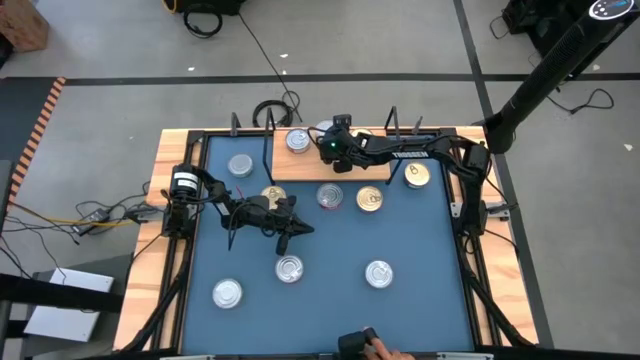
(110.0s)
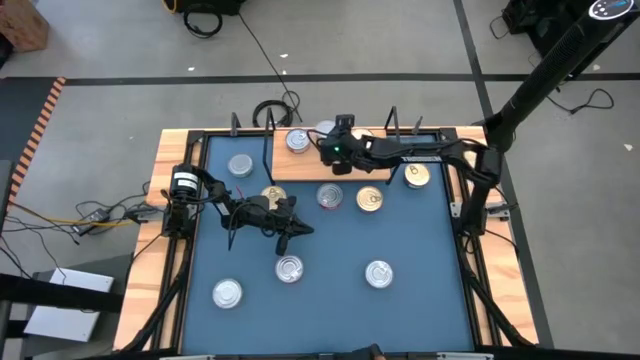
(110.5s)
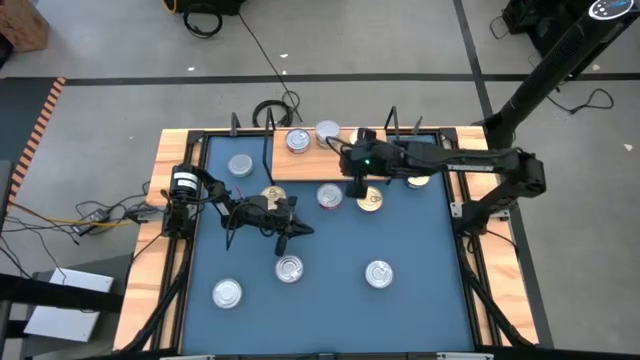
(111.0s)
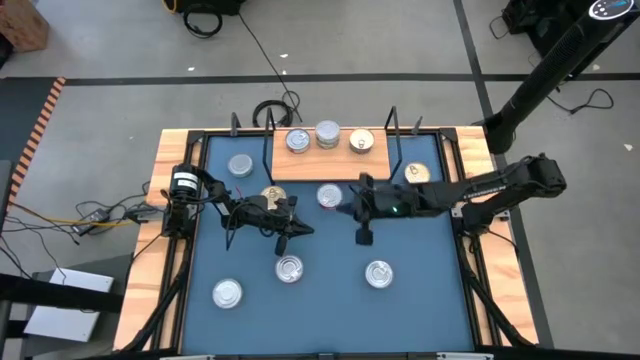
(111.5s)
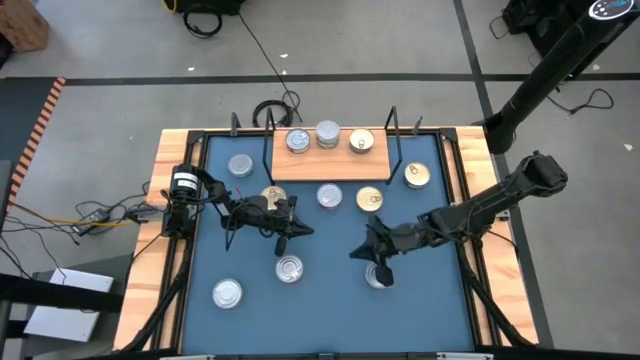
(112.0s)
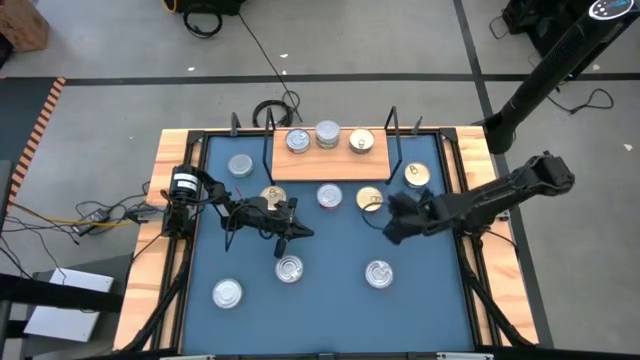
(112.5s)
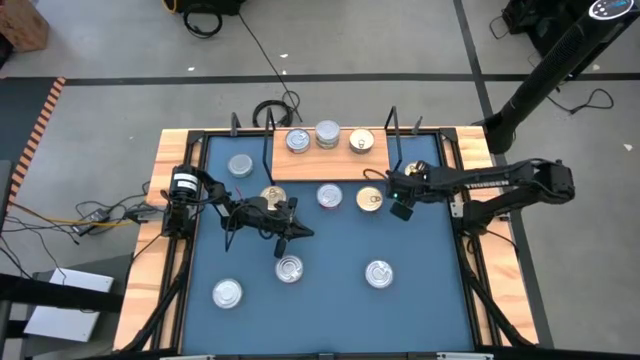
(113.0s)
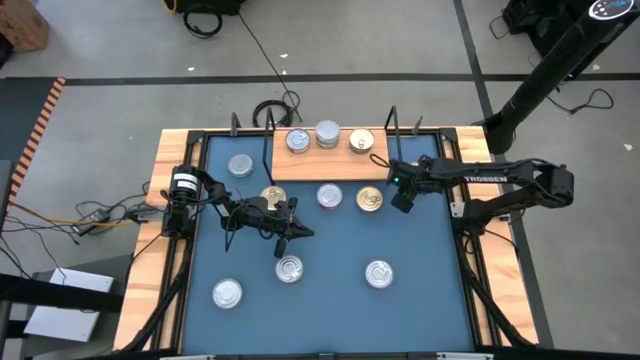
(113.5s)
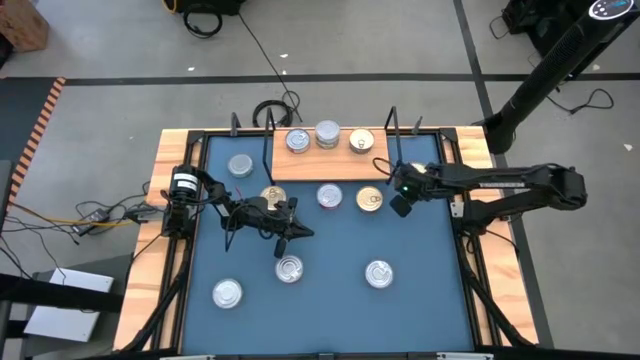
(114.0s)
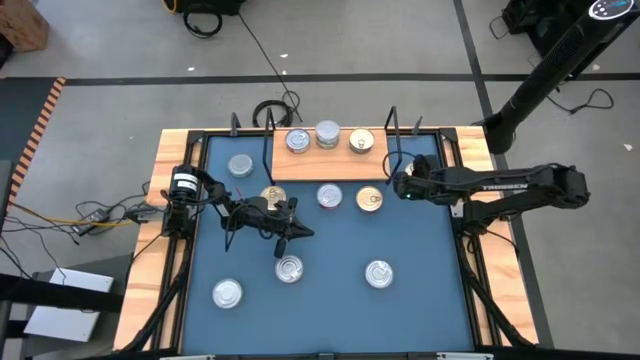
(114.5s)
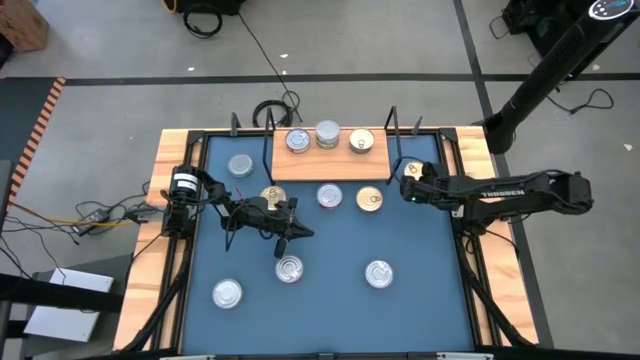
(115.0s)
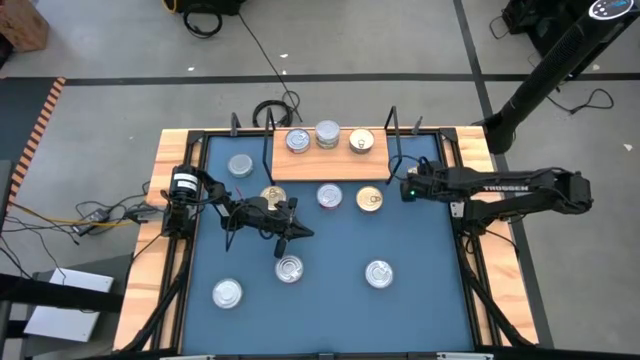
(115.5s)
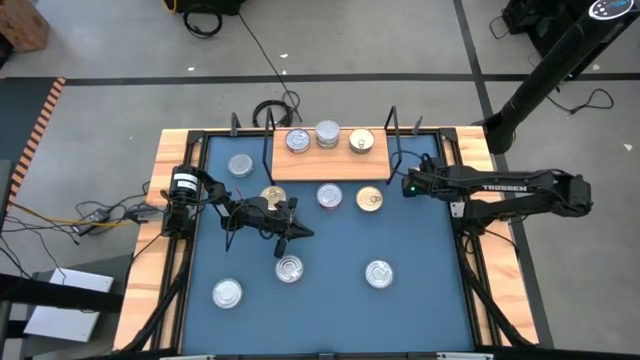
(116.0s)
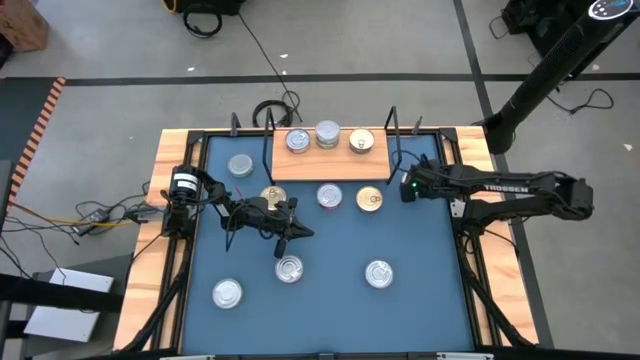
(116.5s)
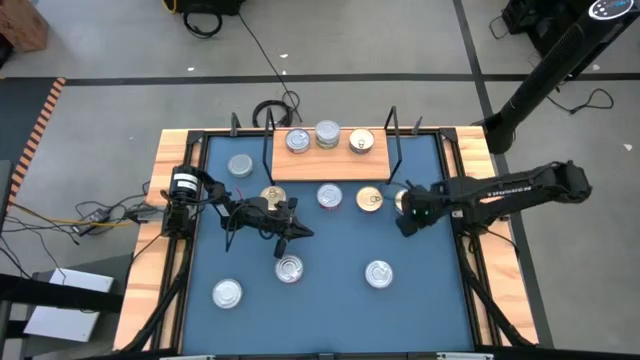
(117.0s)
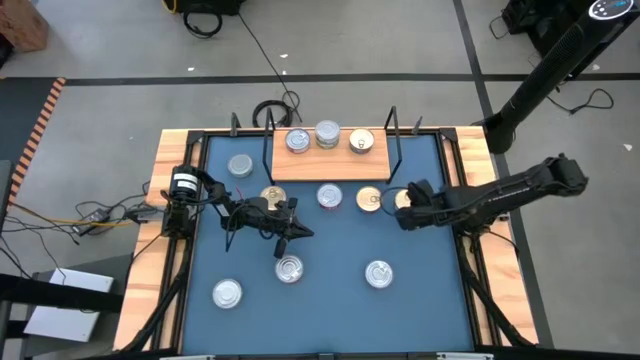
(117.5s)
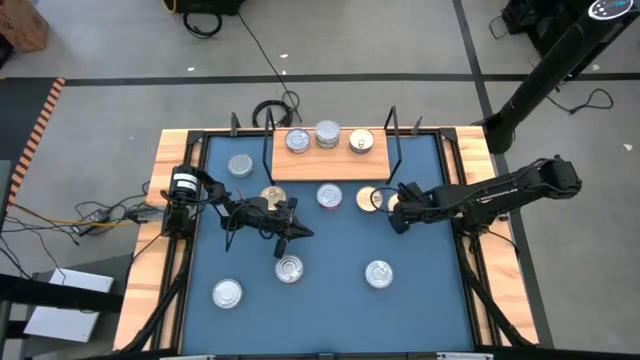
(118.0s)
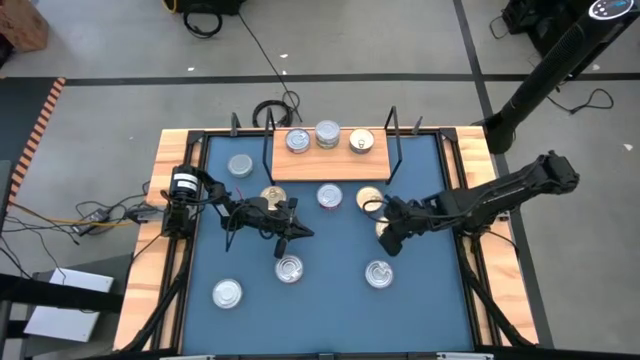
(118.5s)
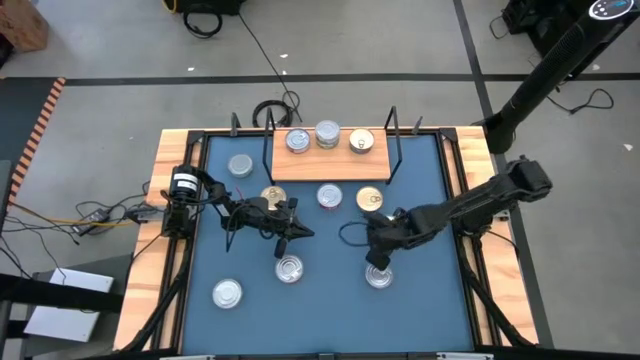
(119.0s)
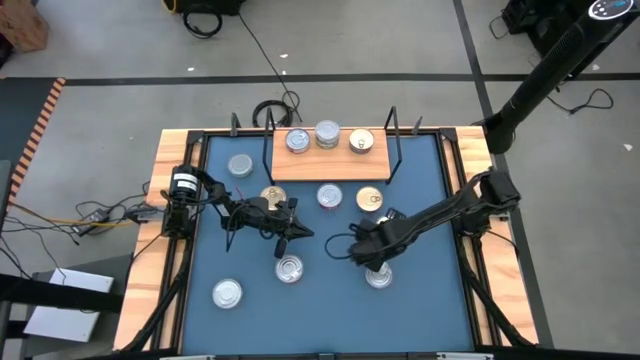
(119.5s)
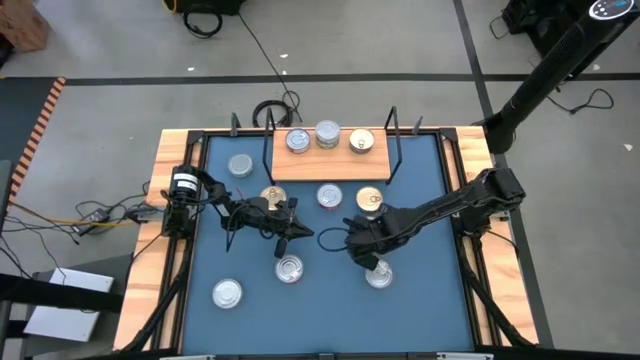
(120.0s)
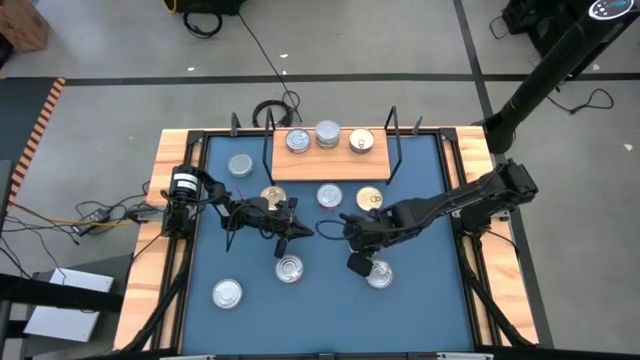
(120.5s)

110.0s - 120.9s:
Task: Stack canned seafood by type on shelf
Stack the blue tuna can on top of the other blue tuna can on the shelf

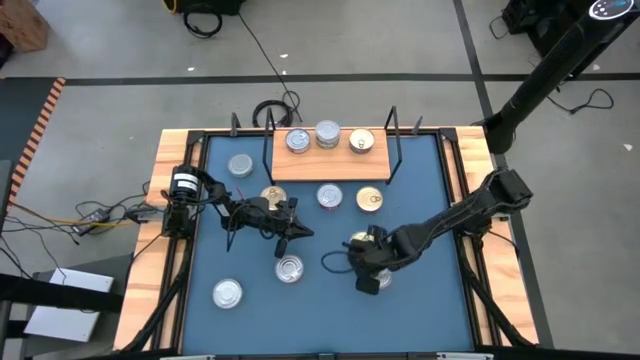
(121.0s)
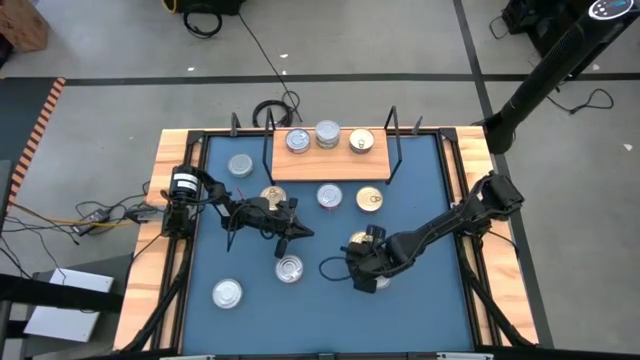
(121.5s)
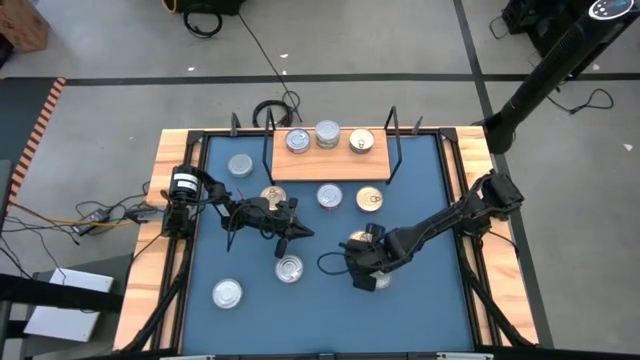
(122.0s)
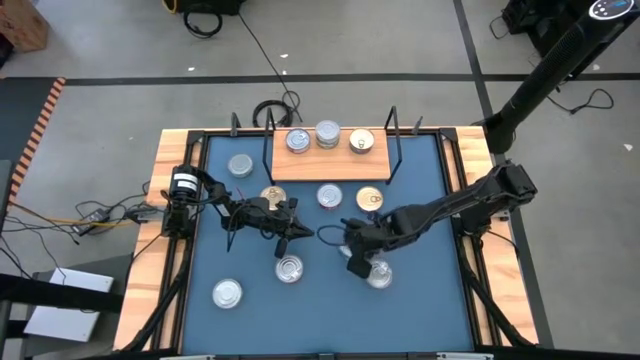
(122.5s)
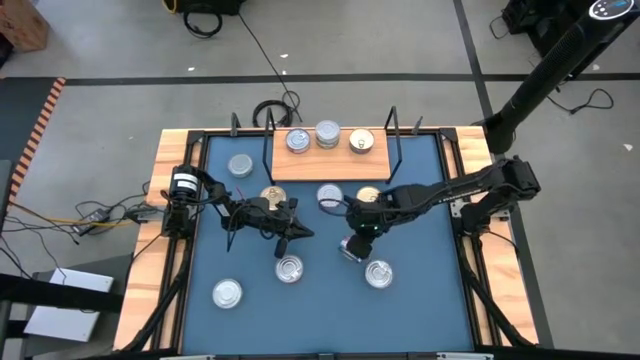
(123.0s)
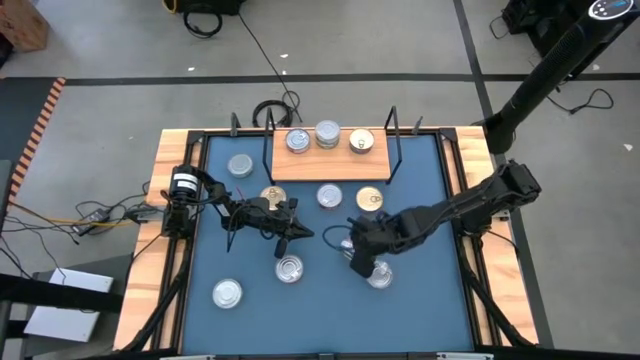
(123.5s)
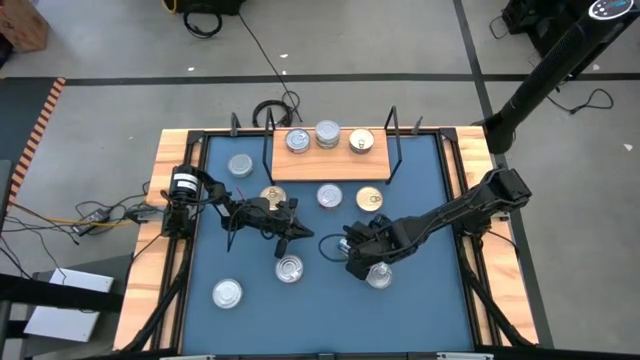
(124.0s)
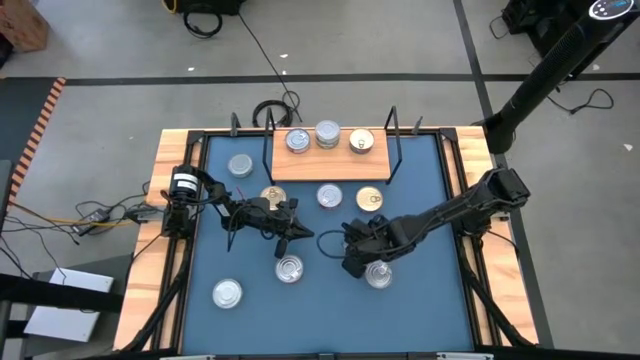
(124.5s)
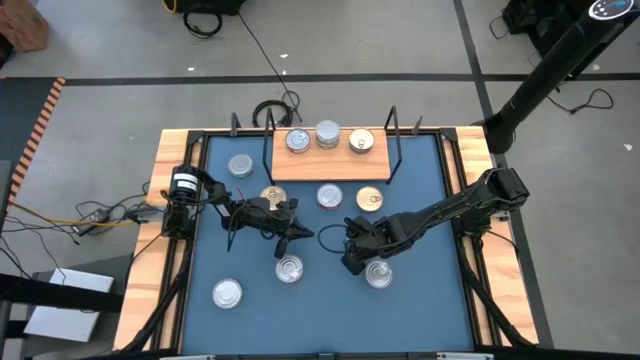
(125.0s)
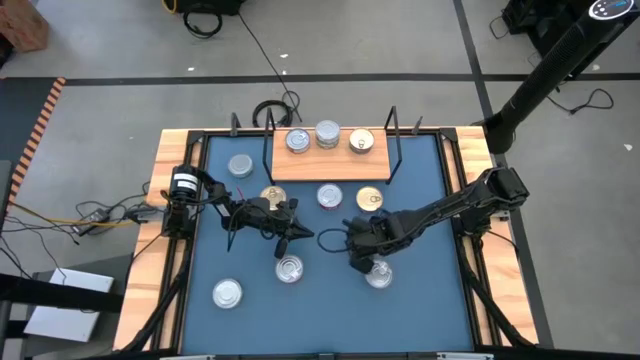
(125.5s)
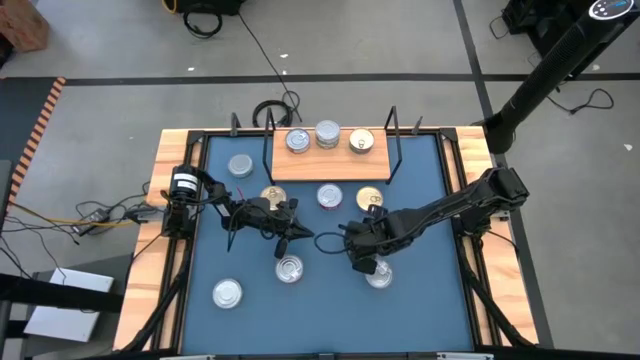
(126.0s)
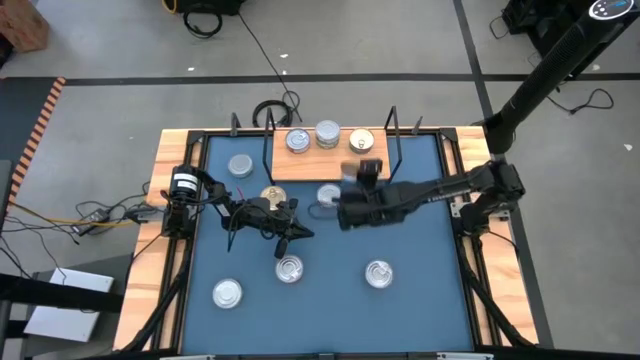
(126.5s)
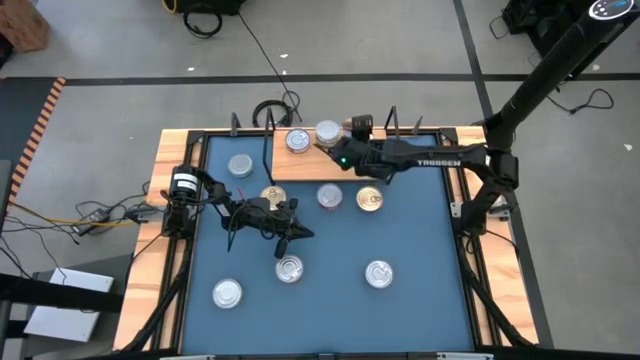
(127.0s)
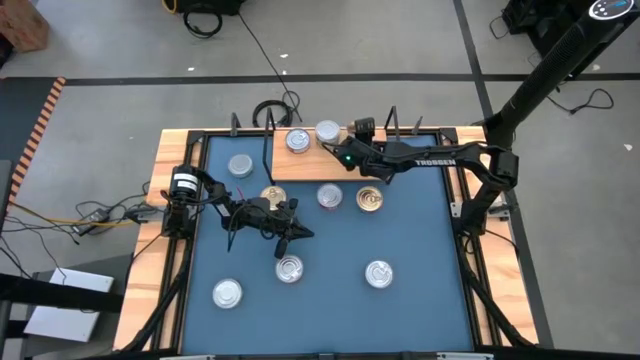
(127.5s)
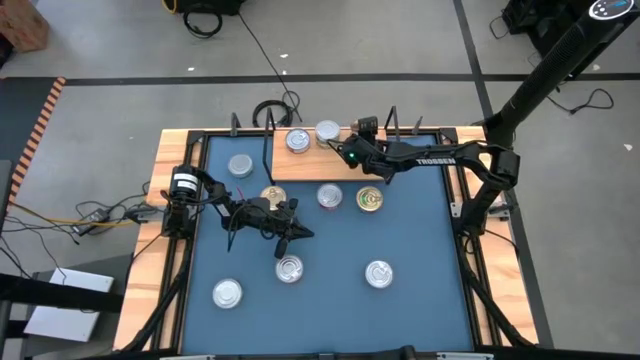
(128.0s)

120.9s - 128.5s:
Stack the blue tuna can on top of the other blue tuna can on the shelf
